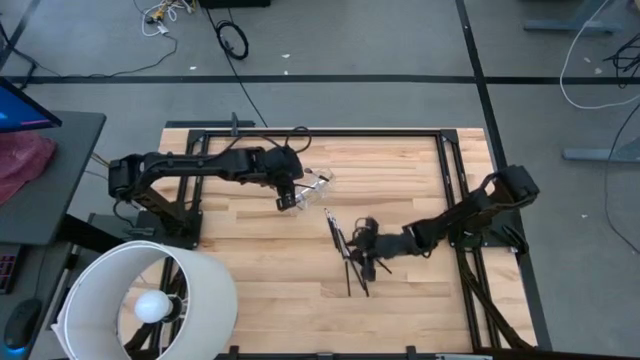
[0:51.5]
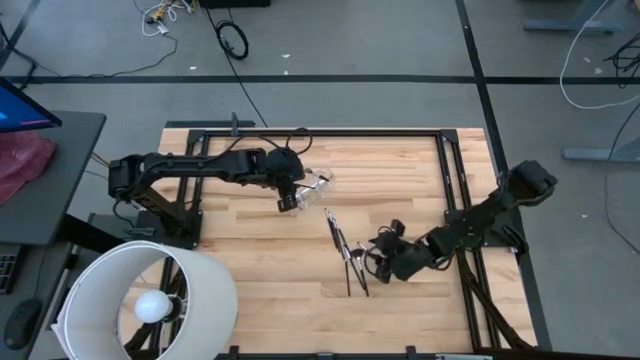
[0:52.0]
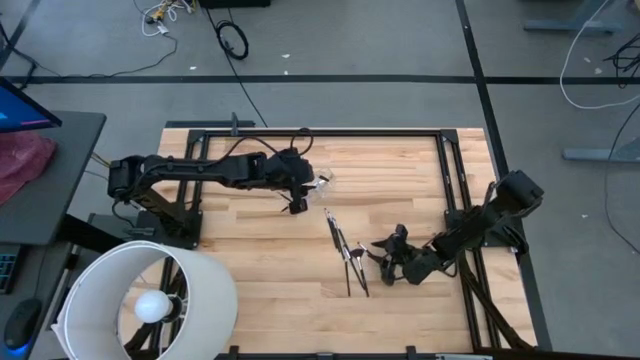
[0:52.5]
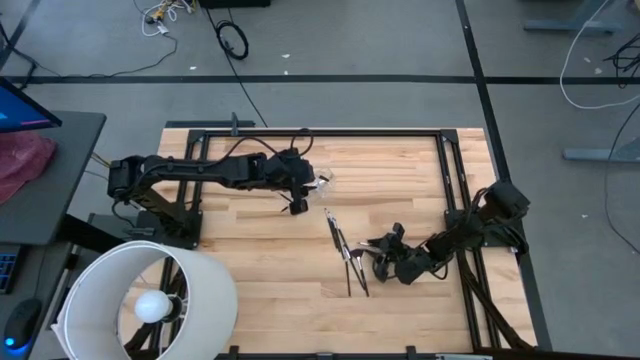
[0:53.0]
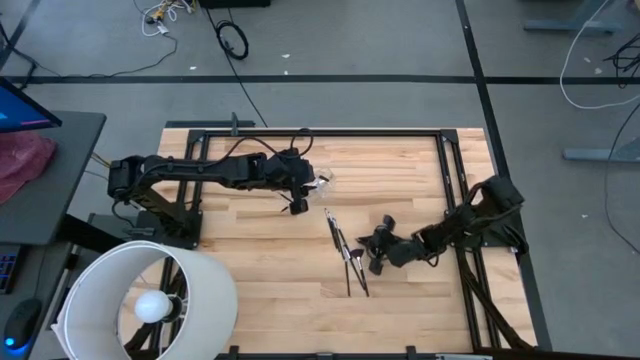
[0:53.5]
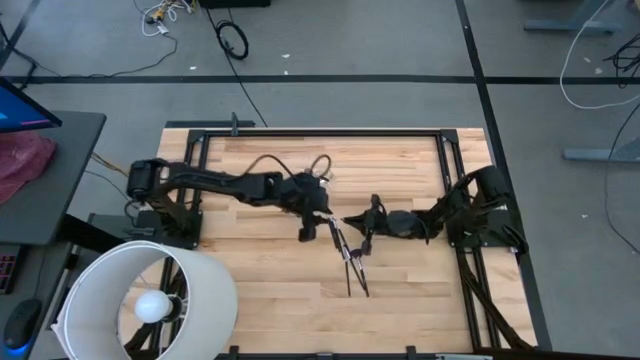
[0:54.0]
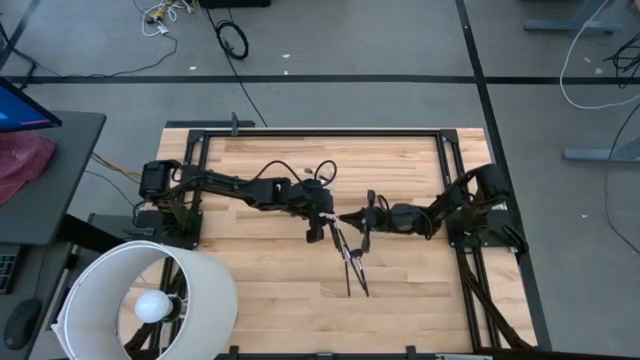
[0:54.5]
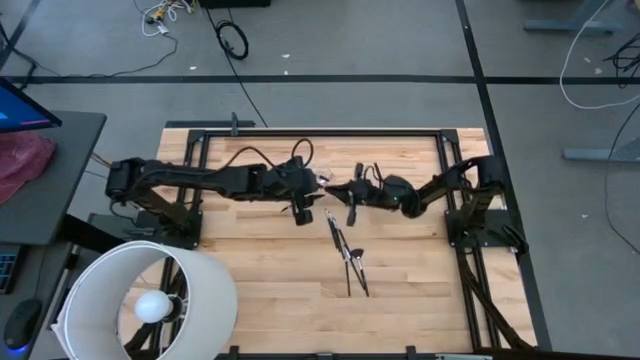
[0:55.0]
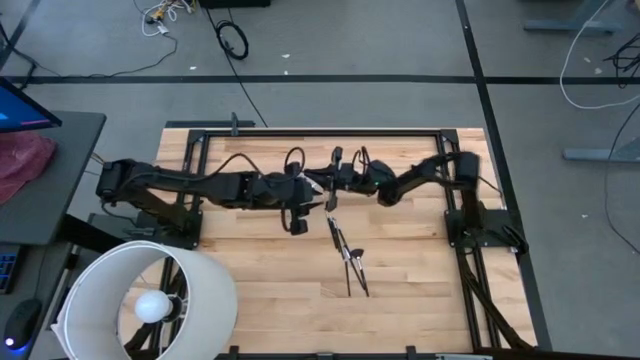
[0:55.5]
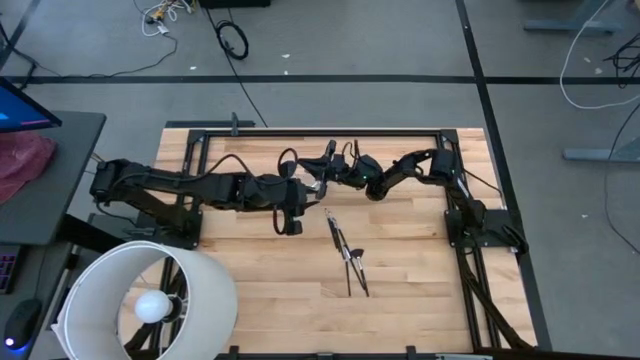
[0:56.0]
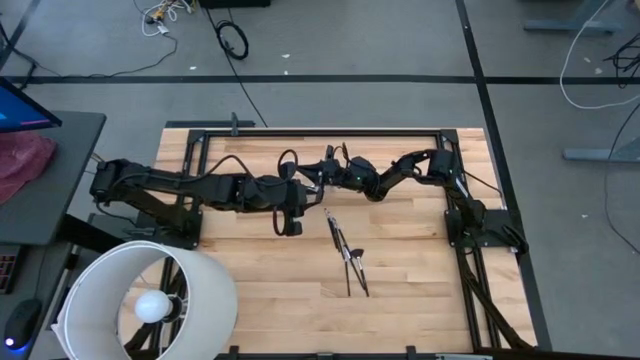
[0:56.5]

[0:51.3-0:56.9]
Task: Put items in baskets/containers
Put the black eyeshadow brush into the transparent organizer

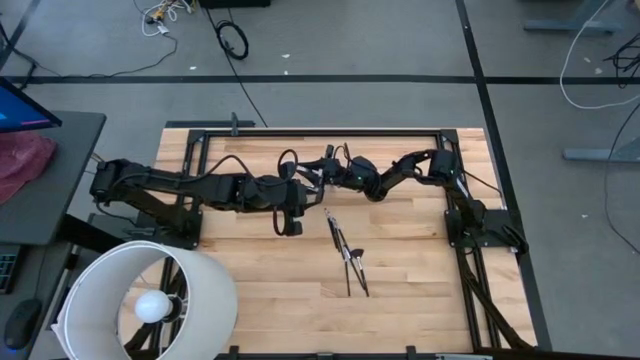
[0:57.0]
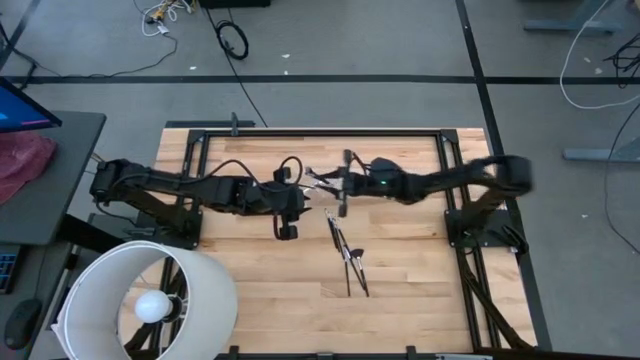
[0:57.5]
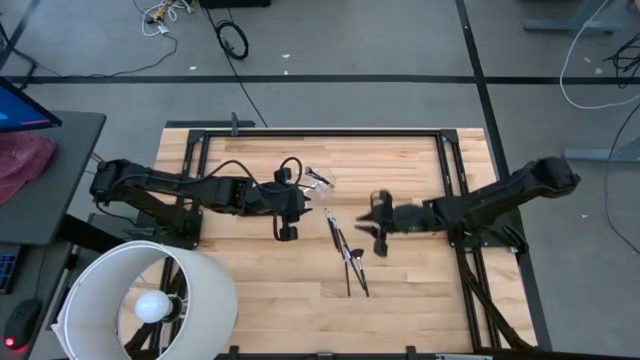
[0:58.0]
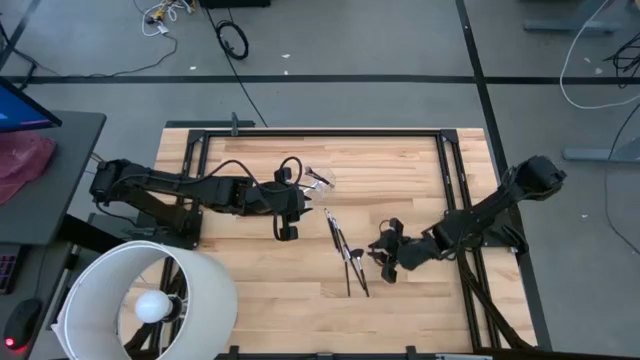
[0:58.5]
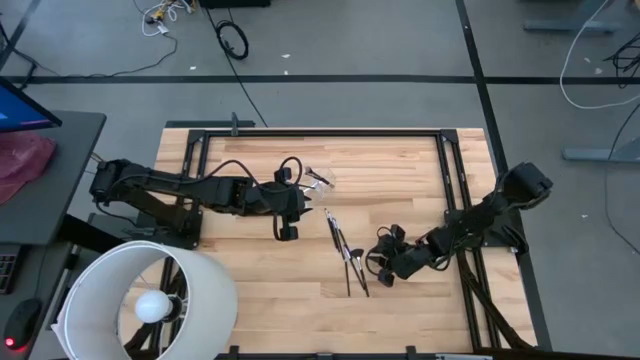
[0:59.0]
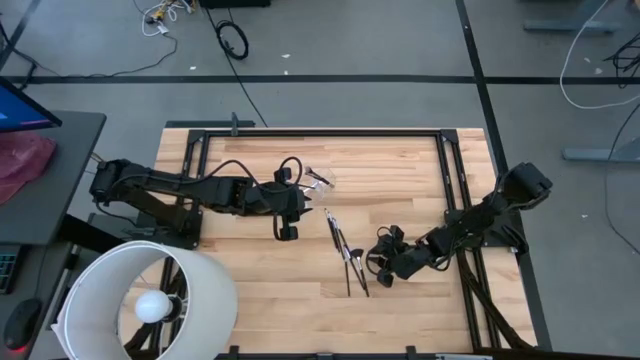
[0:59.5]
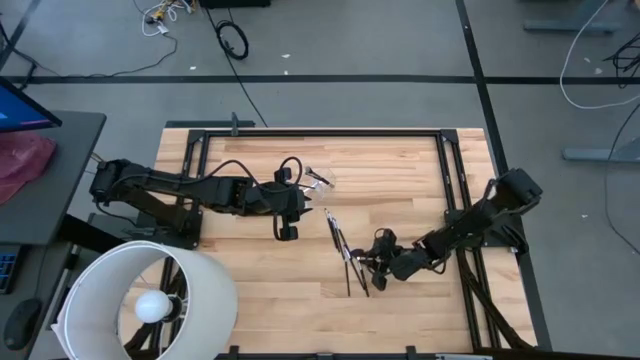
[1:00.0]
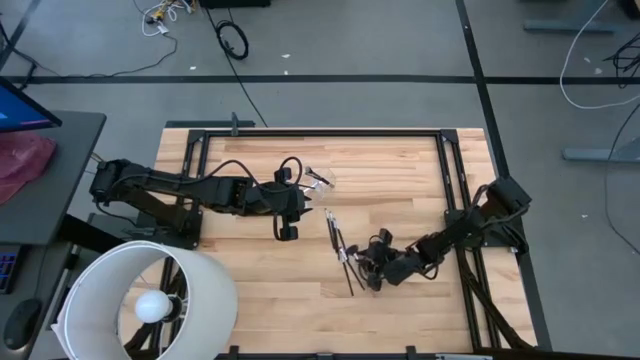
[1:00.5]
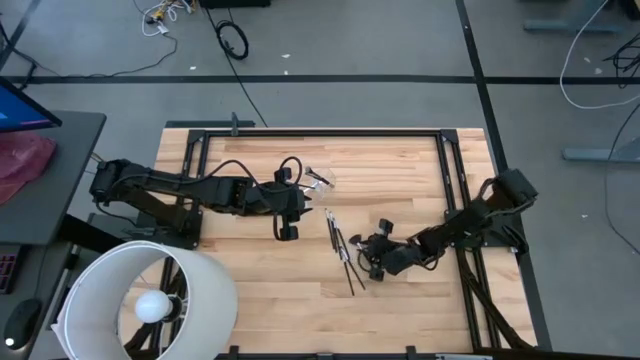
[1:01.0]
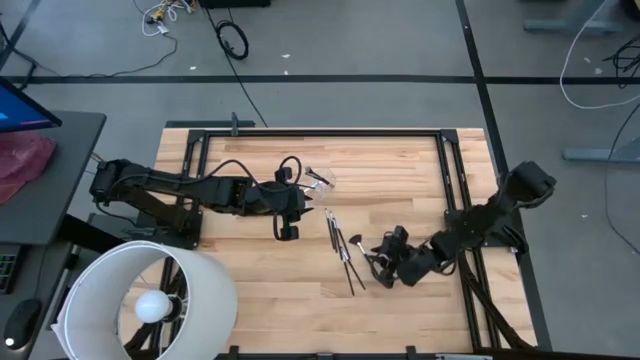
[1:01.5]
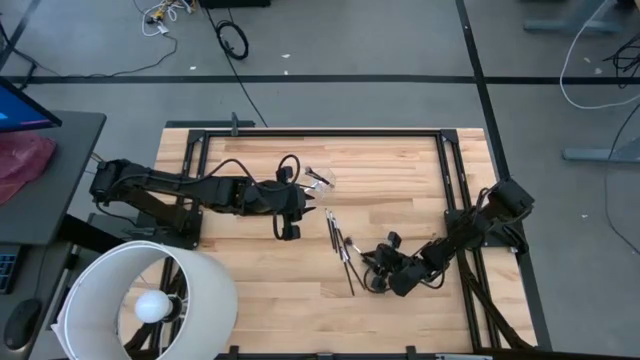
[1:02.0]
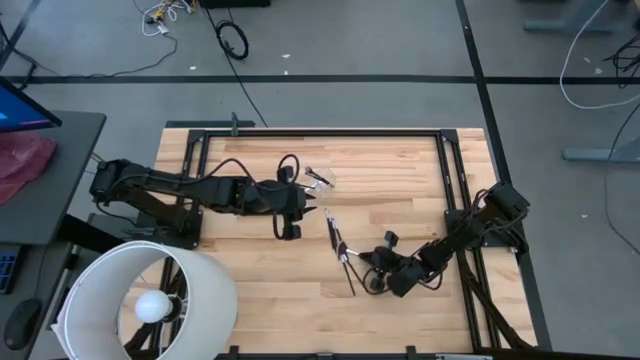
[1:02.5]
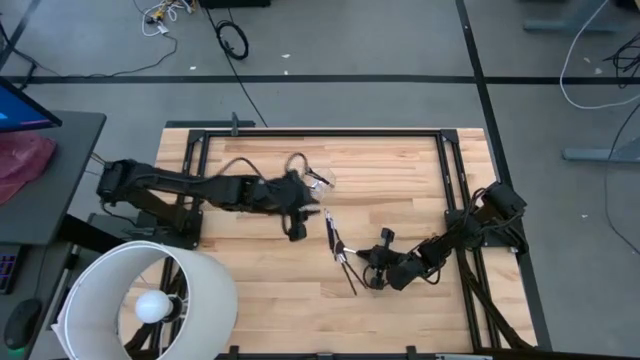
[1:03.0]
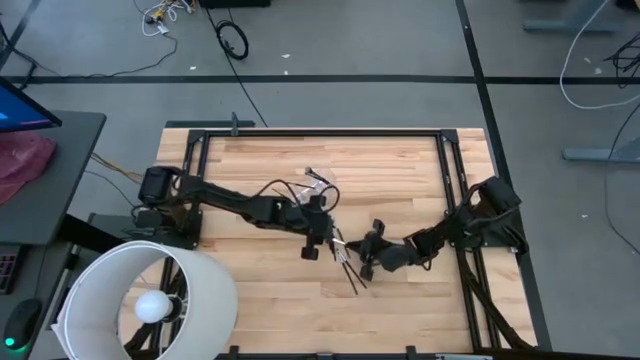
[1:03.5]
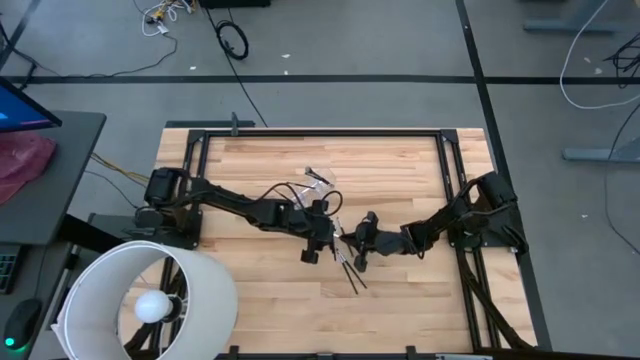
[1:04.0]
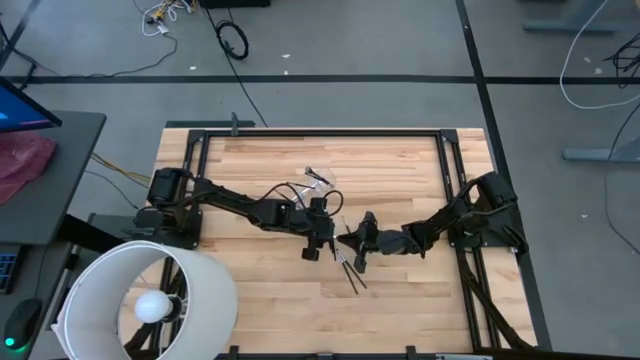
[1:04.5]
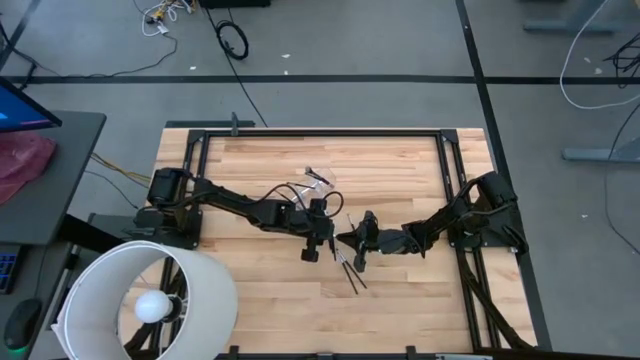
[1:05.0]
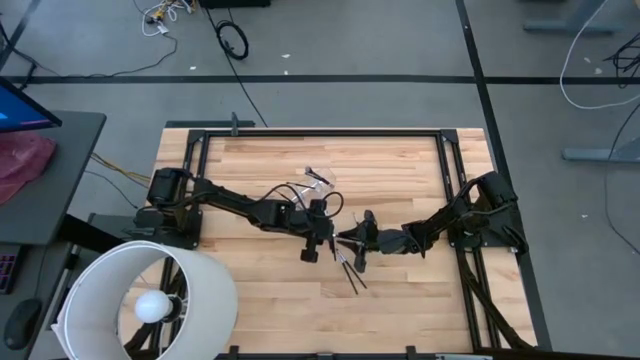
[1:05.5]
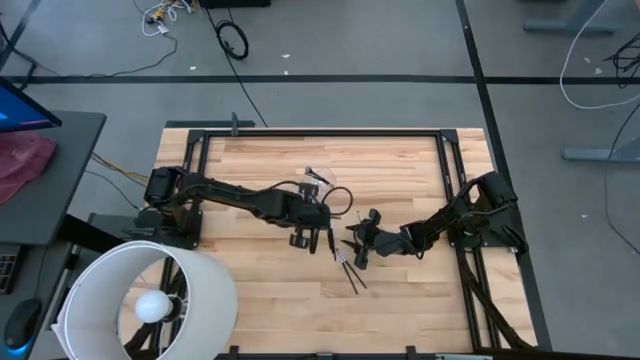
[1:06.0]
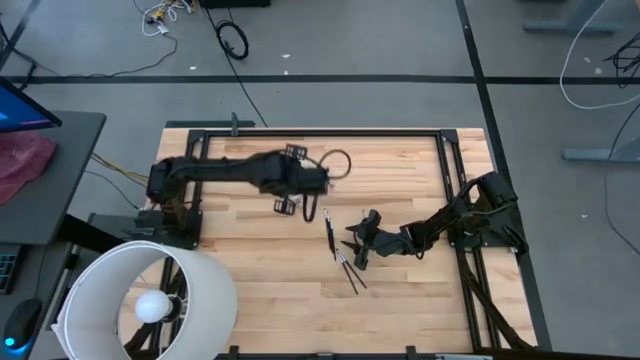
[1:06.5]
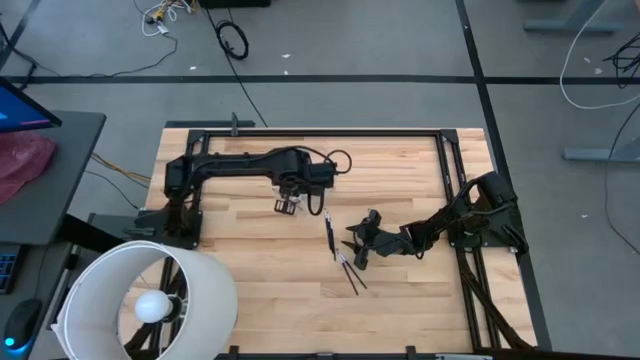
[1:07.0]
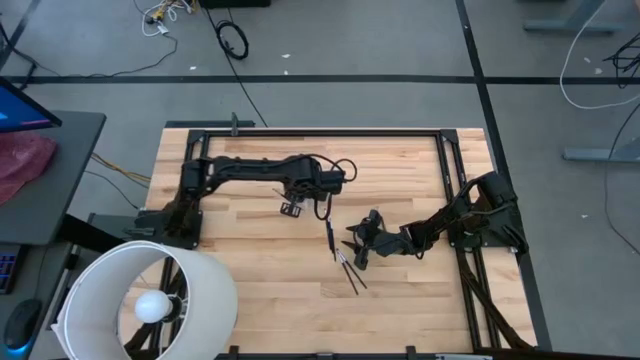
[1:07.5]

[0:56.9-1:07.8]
Put the black highlighter brush into the transparent organizer

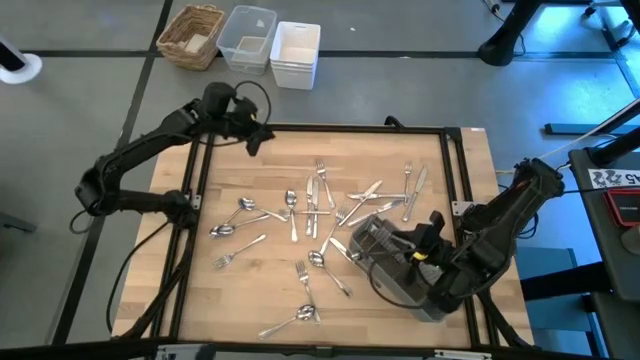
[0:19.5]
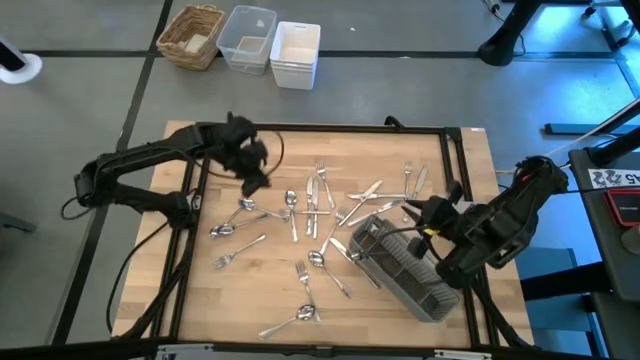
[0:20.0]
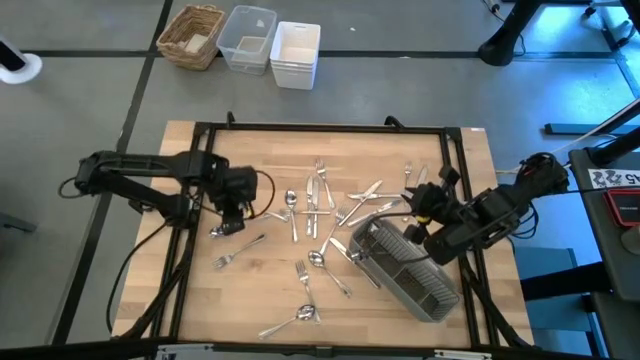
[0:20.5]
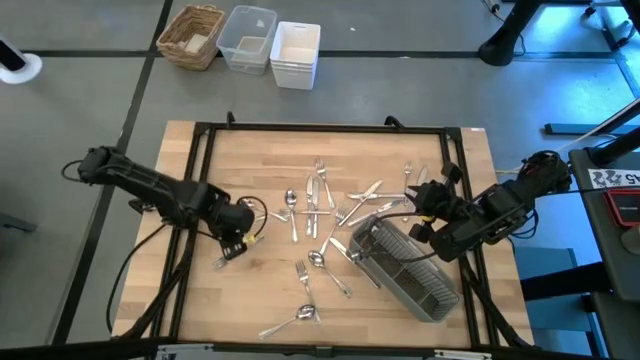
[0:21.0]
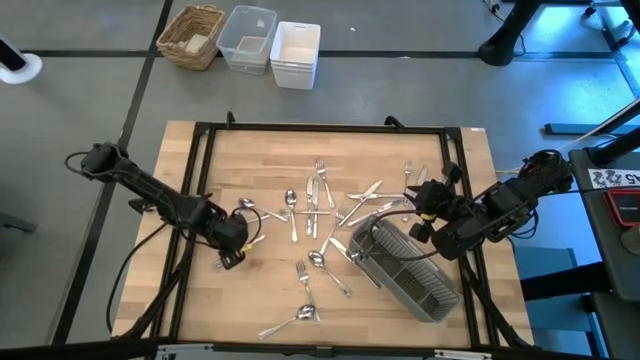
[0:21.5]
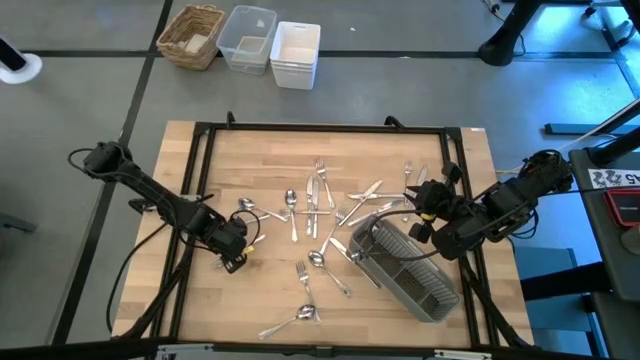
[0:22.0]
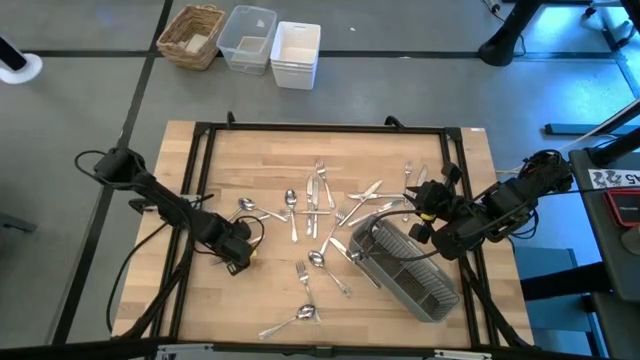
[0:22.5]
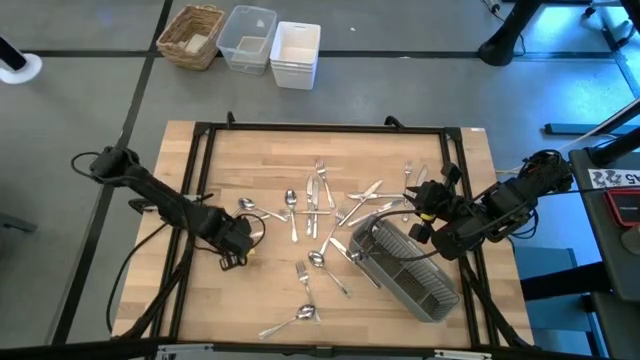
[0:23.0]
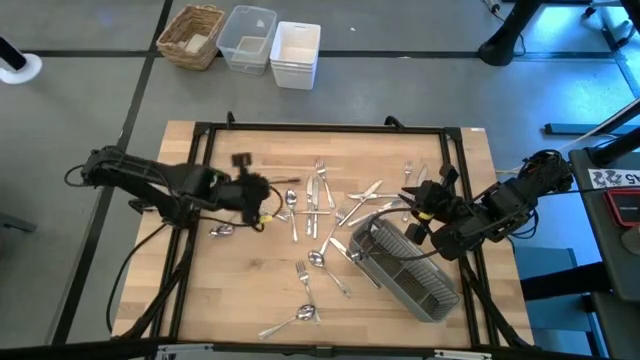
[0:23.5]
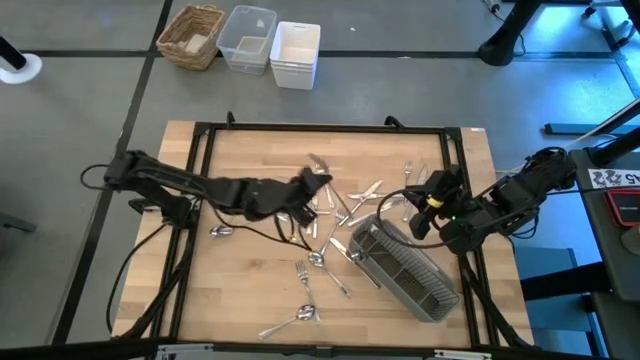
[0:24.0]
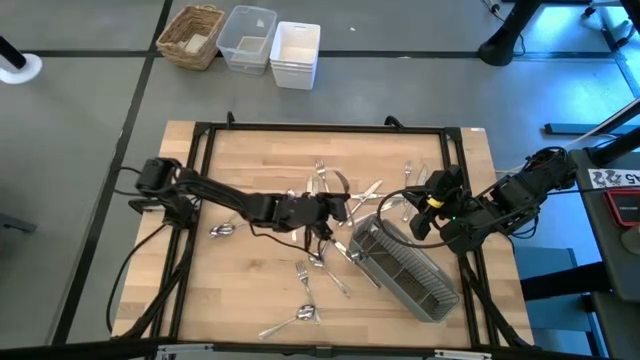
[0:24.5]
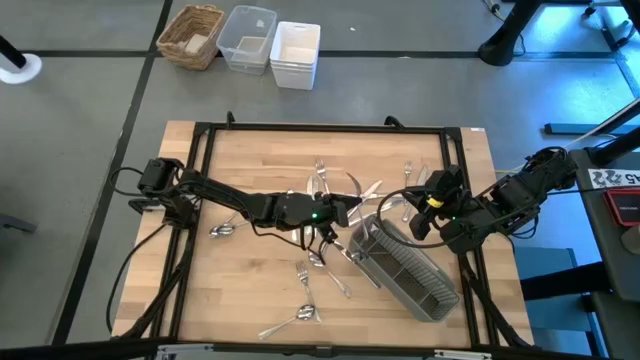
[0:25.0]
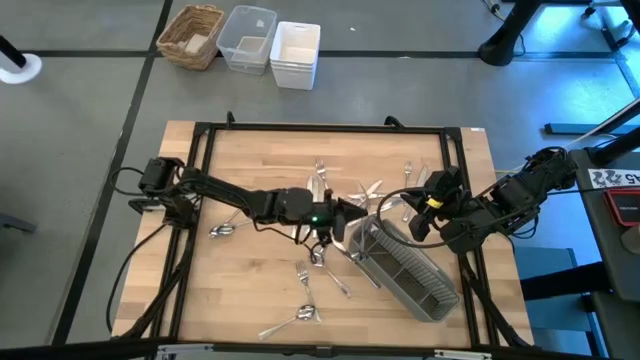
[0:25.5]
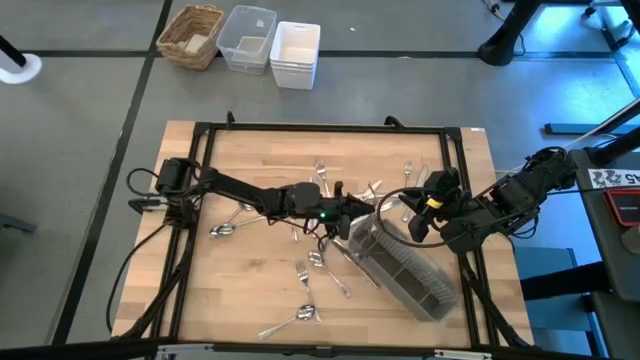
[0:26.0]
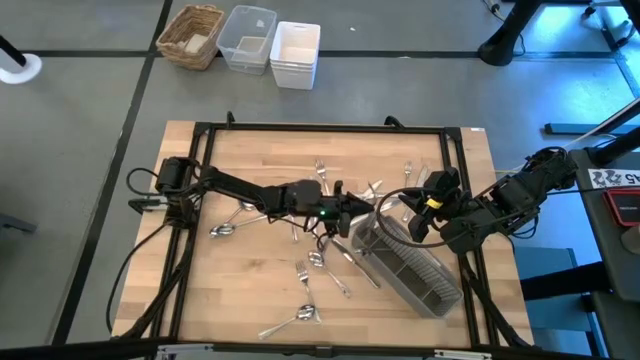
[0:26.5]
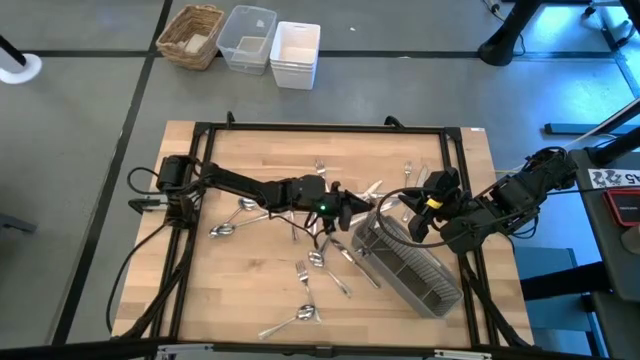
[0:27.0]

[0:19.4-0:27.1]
Task: Sort silverware
Put the silver fork into the gray silverware basket
